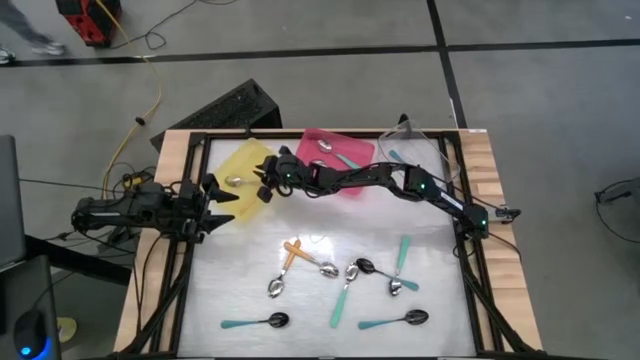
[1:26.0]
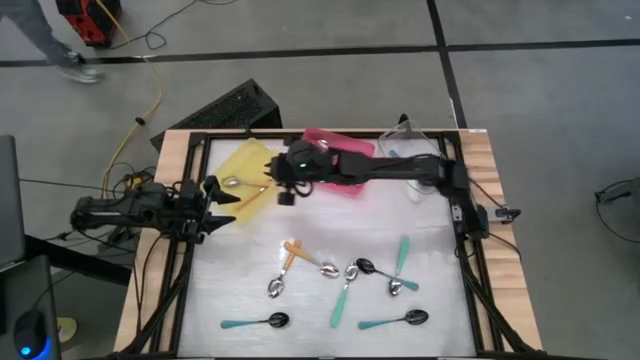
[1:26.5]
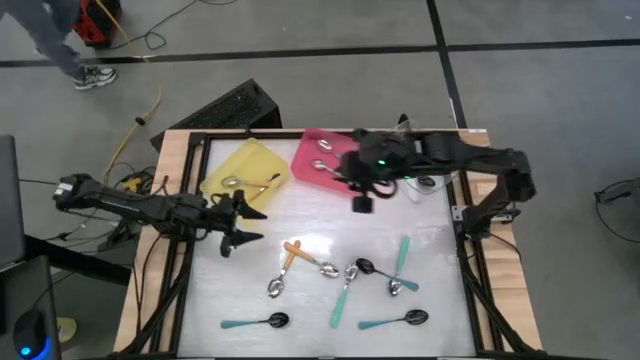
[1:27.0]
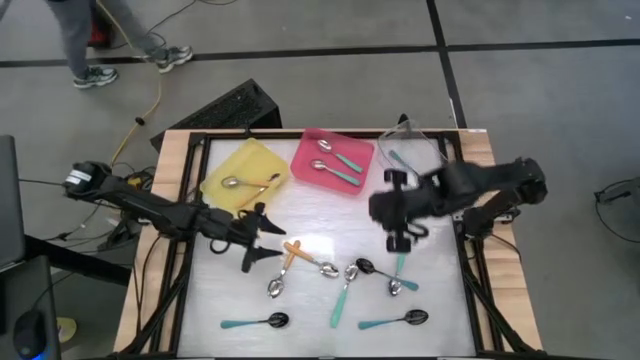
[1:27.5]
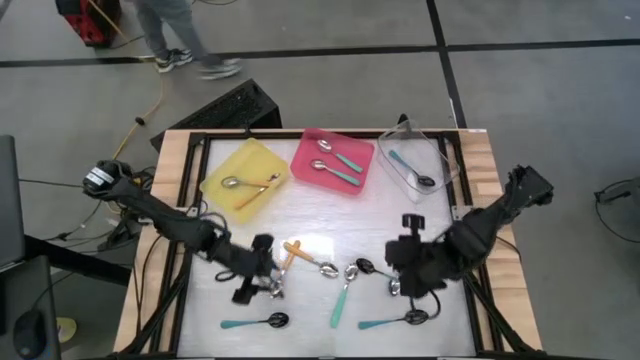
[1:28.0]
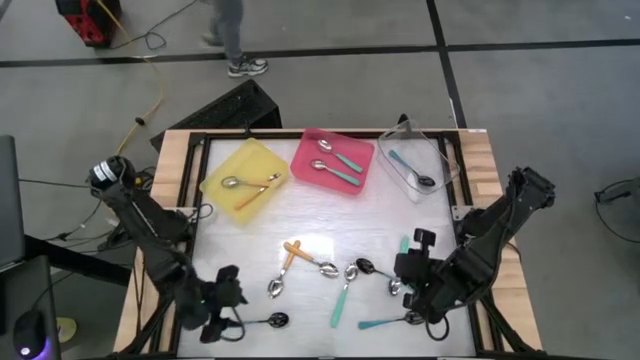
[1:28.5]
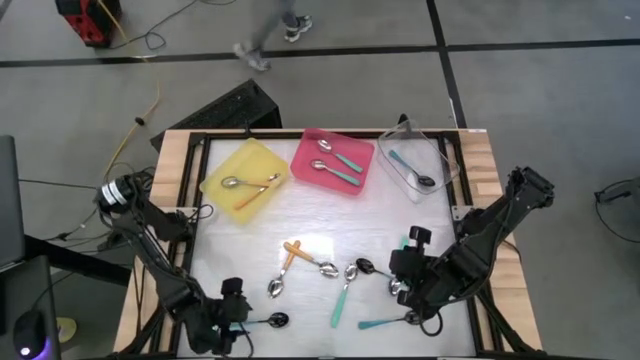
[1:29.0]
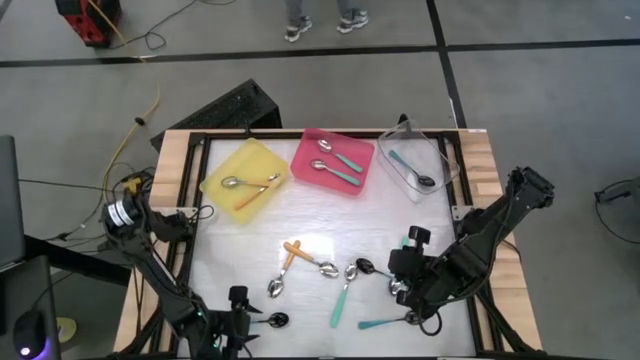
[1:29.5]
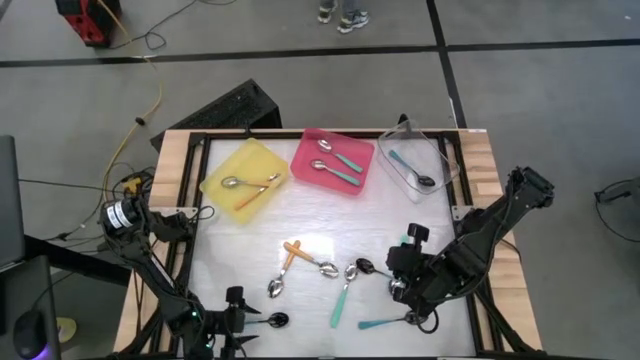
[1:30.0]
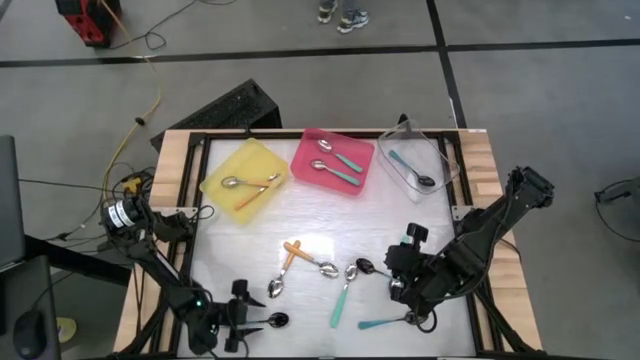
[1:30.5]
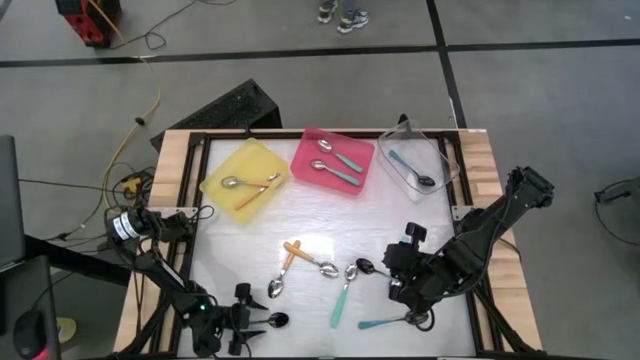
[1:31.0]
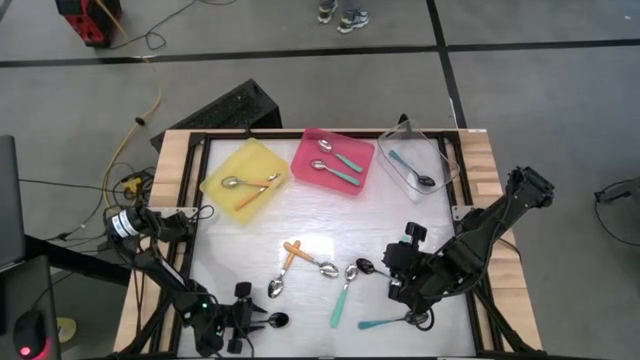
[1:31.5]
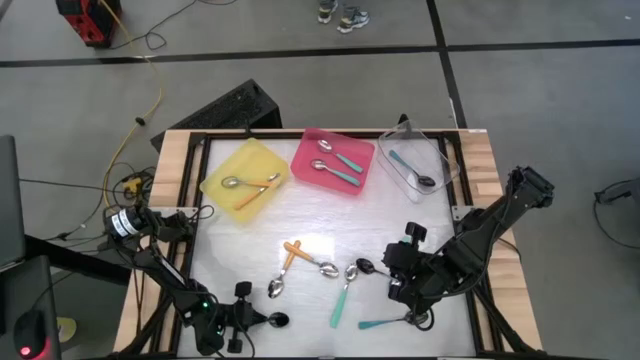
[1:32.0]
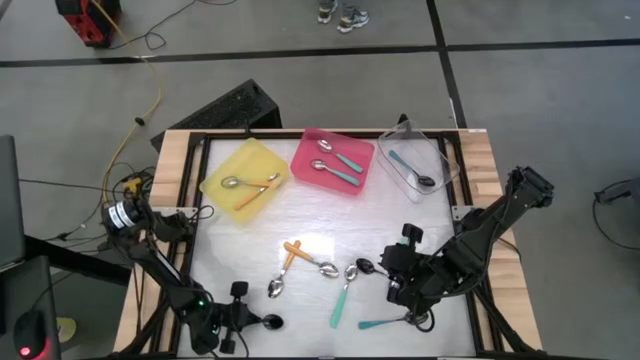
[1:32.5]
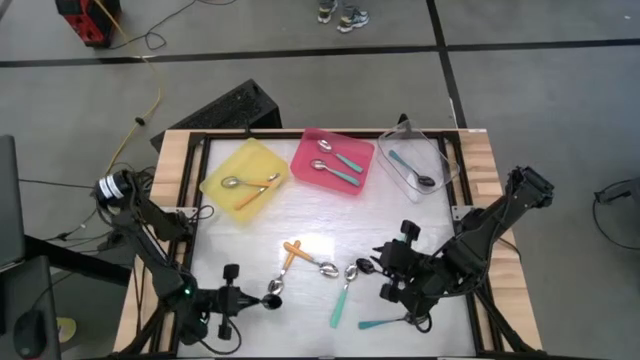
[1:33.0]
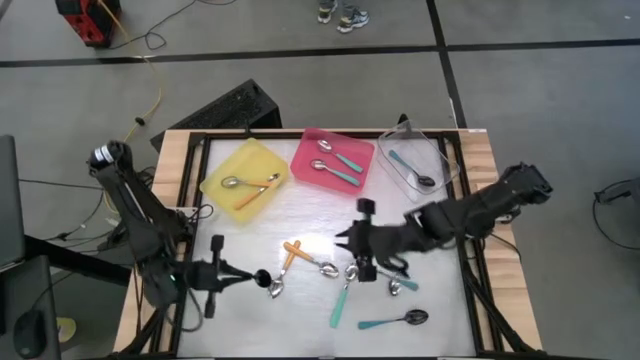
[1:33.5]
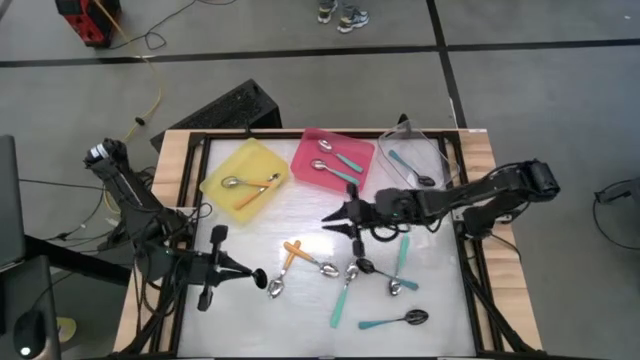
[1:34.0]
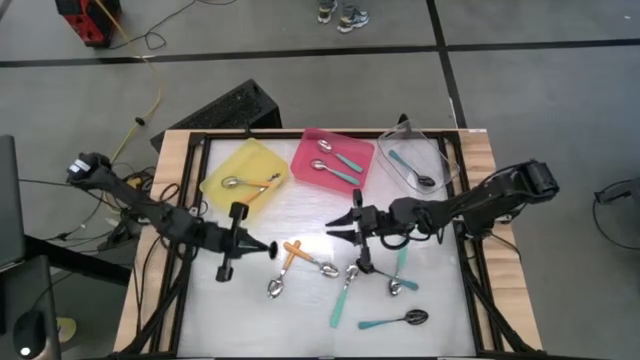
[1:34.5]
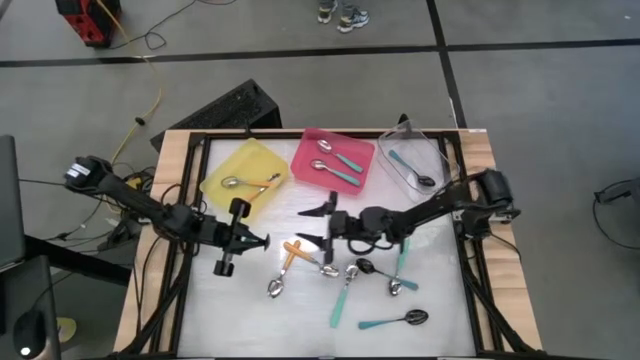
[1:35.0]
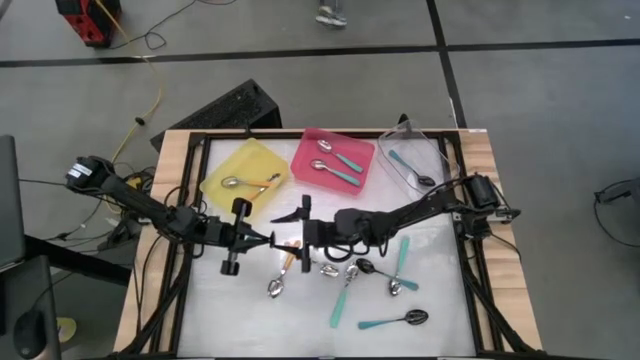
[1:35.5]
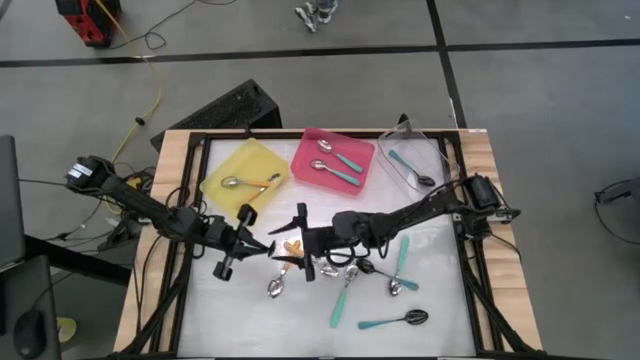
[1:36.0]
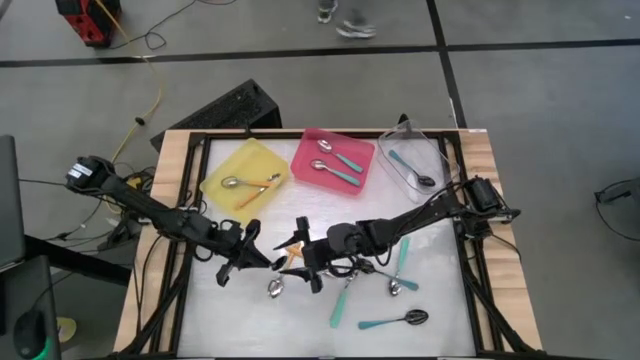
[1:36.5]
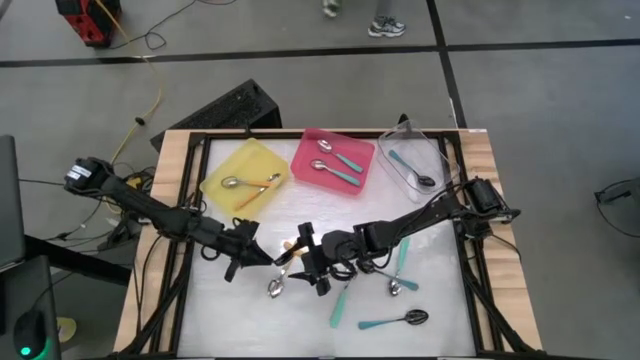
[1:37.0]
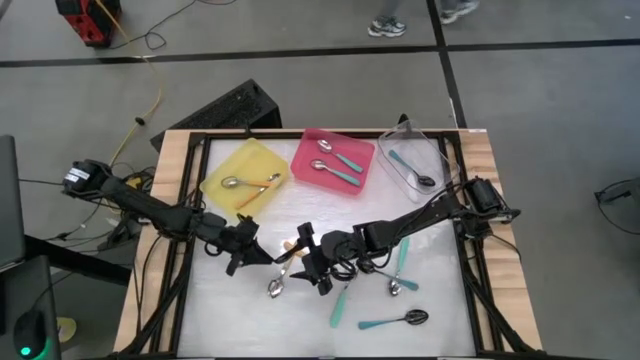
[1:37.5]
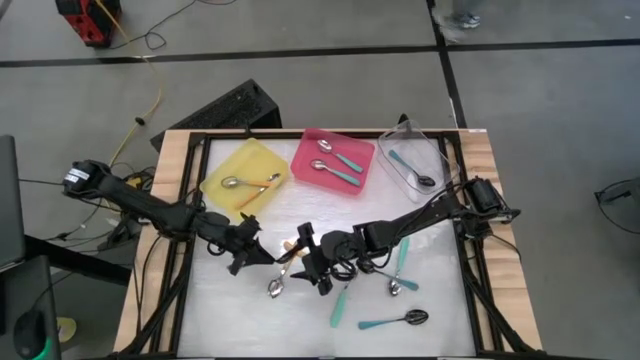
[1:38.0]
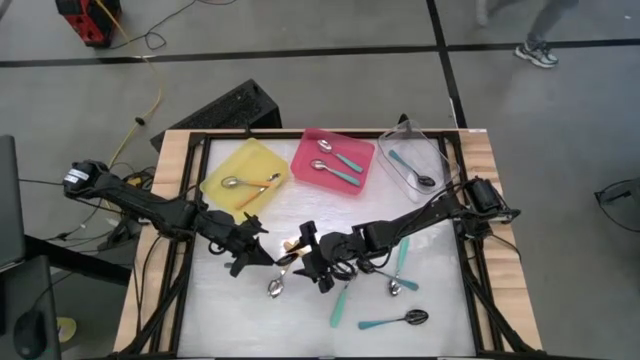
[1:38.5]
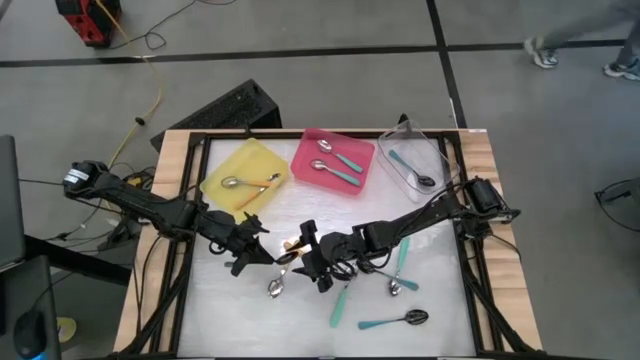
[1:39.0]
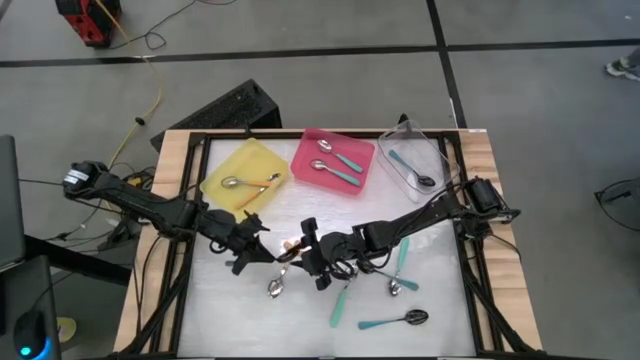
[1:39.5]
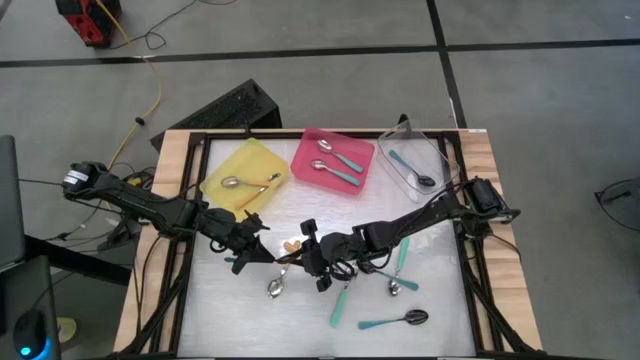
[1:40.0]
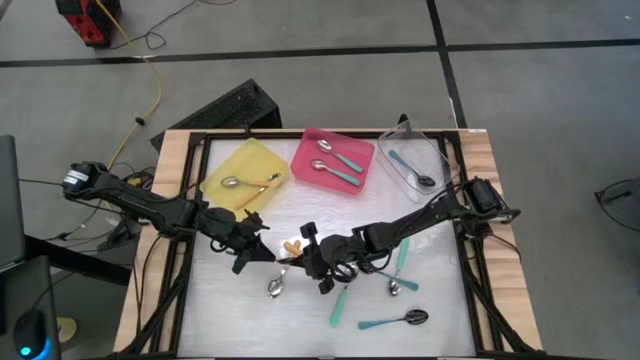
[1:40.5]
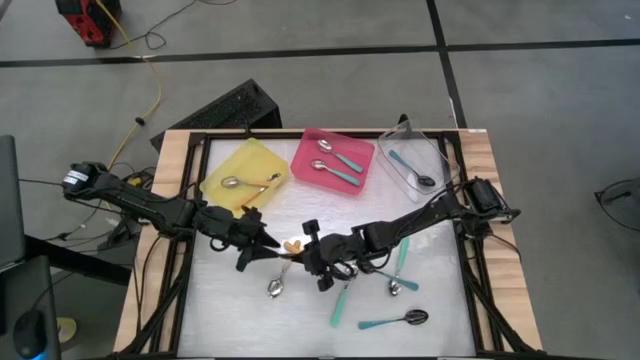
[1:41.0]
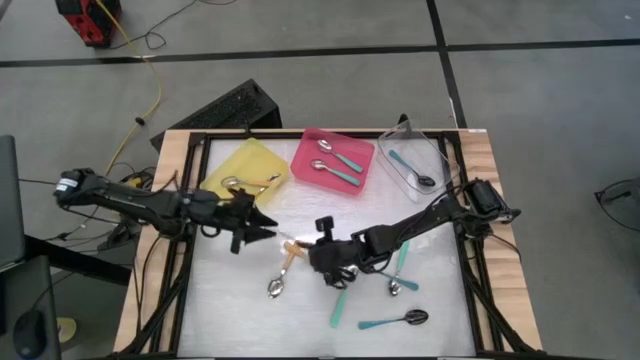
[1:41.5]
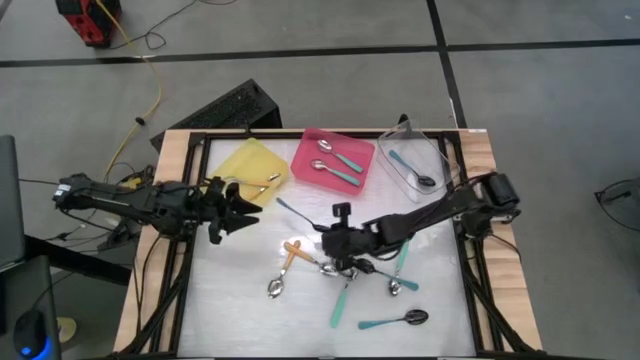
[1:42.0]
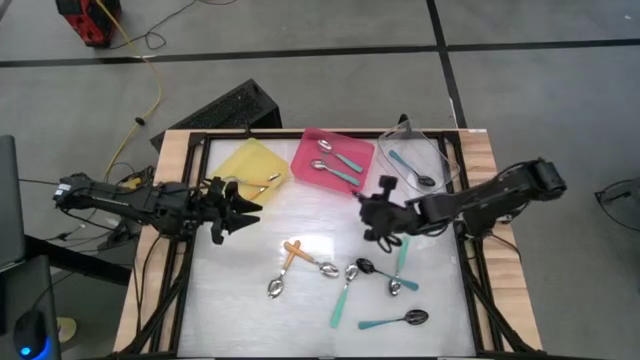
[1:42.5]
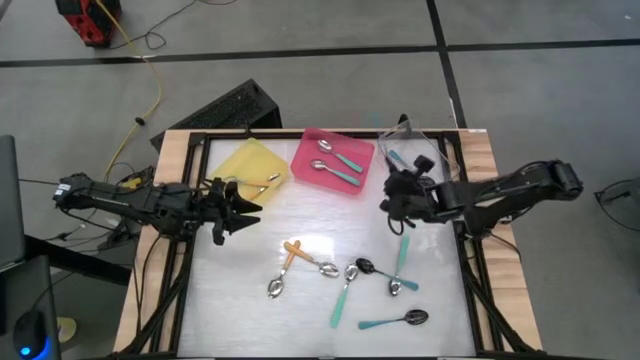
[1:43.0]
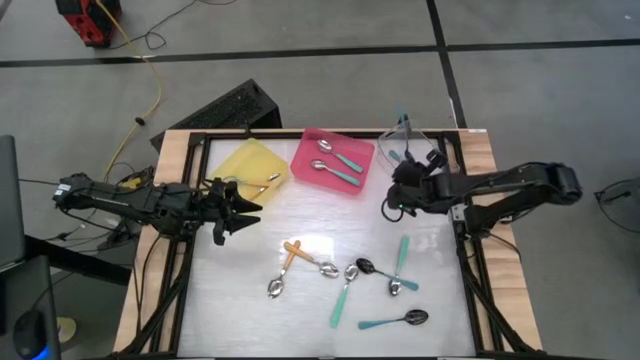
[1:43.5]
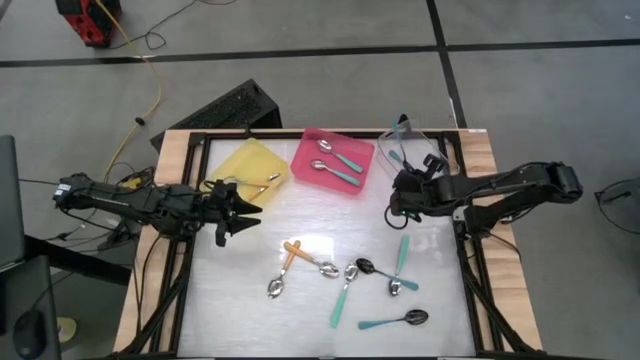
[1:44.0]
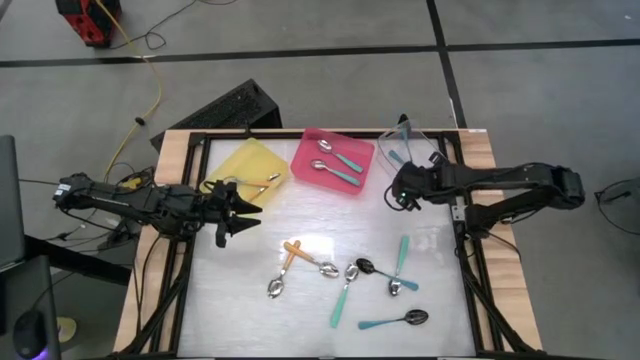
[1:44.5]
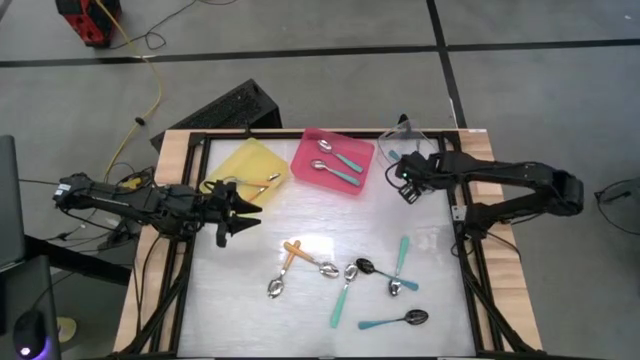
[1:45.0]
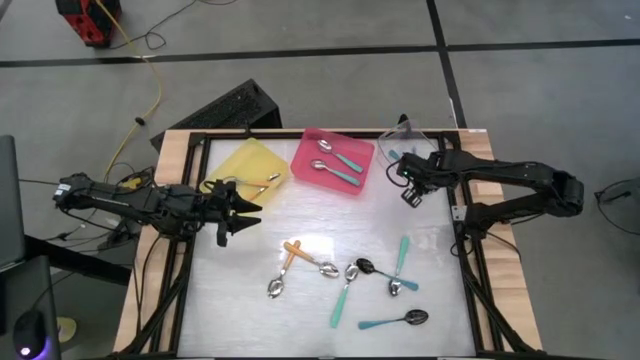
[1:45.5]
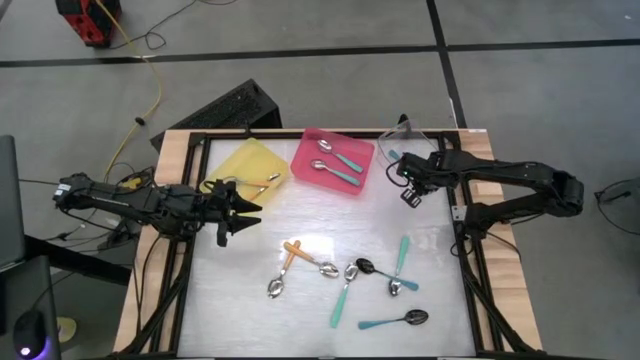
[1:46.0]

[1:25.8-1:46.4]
Task: Sort silverware by color (type)
Put the blue spoon into the transparent bin
